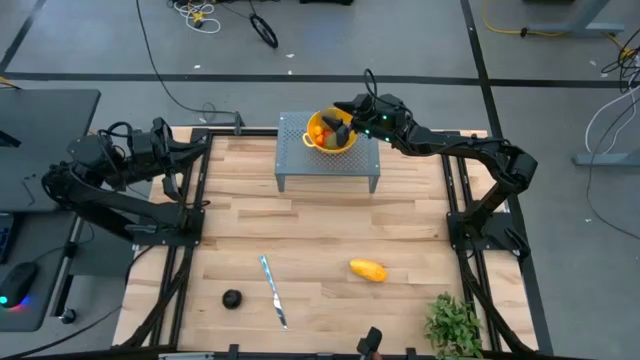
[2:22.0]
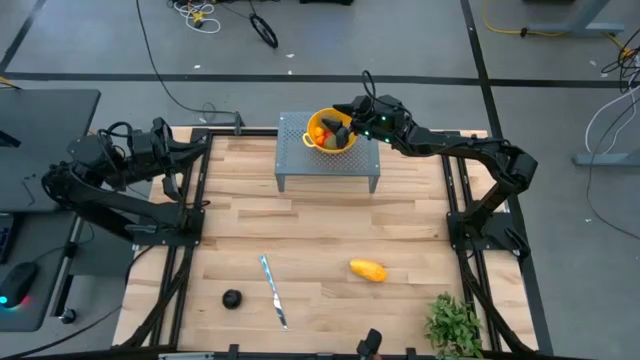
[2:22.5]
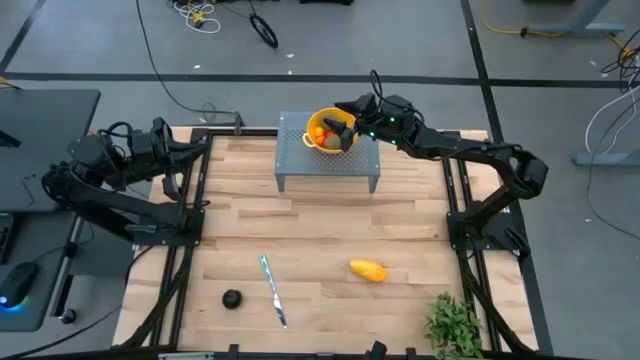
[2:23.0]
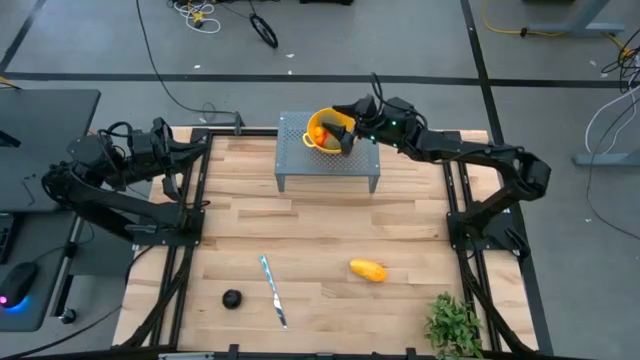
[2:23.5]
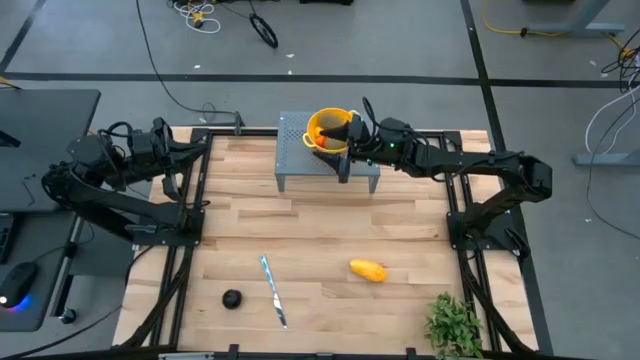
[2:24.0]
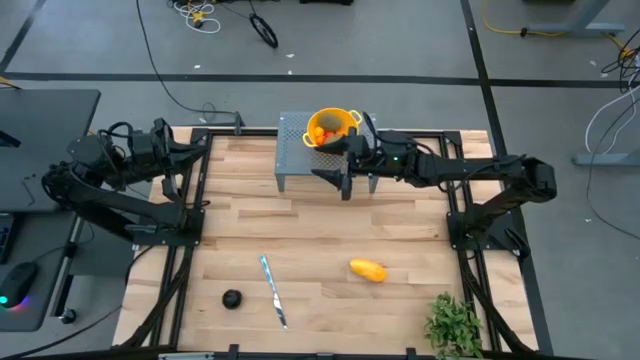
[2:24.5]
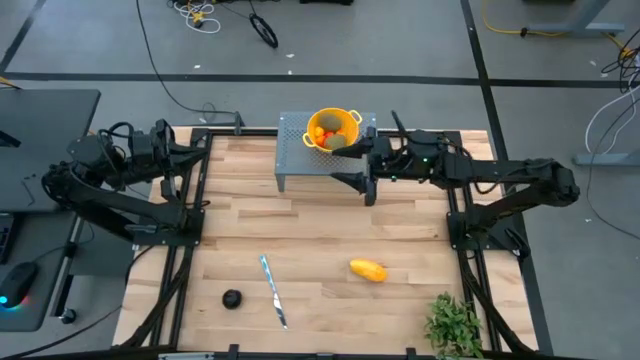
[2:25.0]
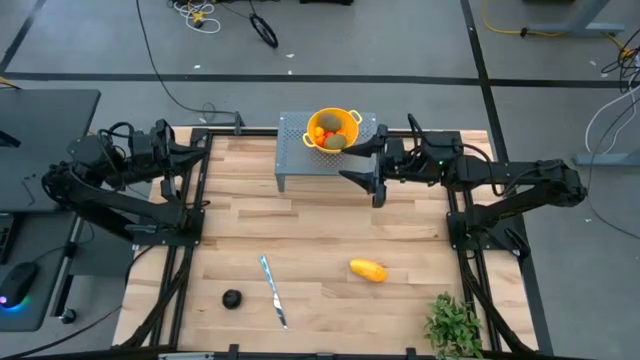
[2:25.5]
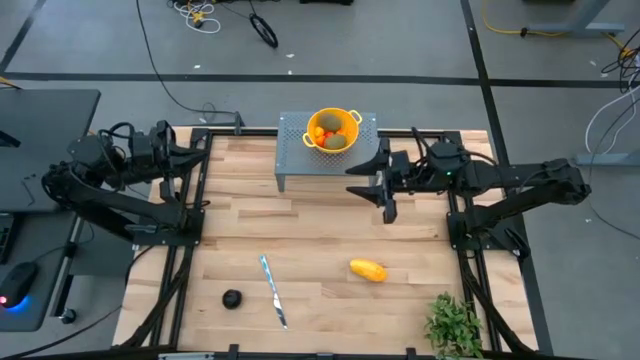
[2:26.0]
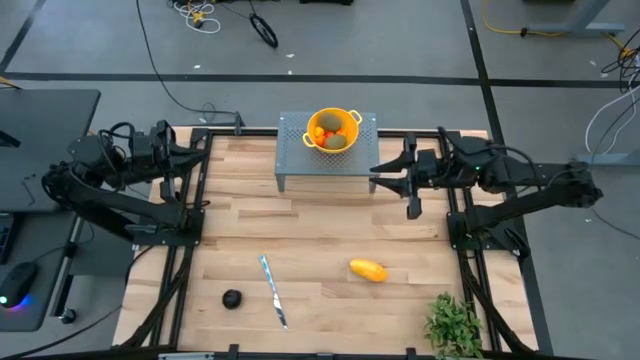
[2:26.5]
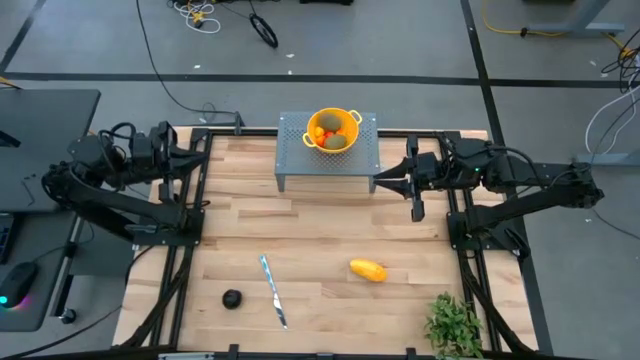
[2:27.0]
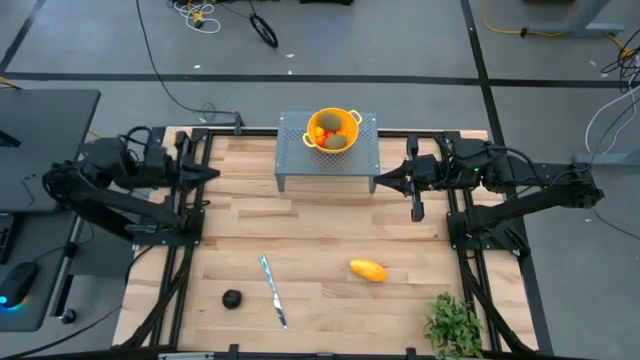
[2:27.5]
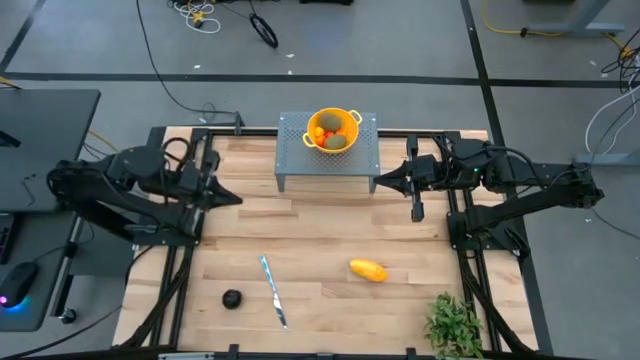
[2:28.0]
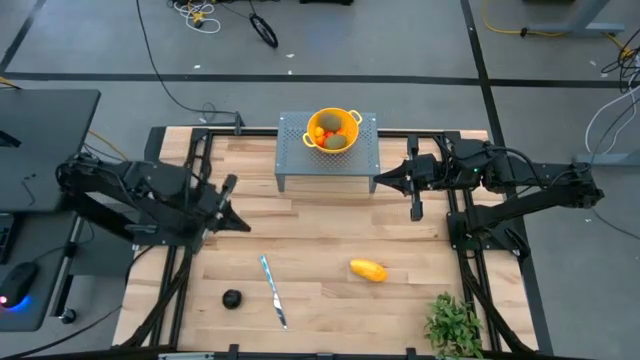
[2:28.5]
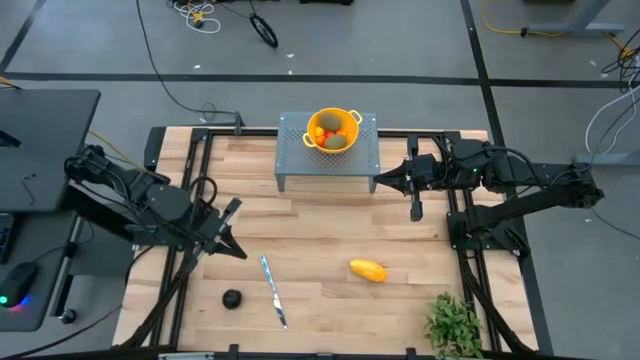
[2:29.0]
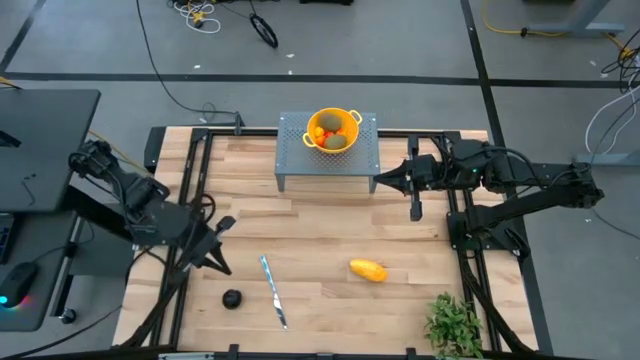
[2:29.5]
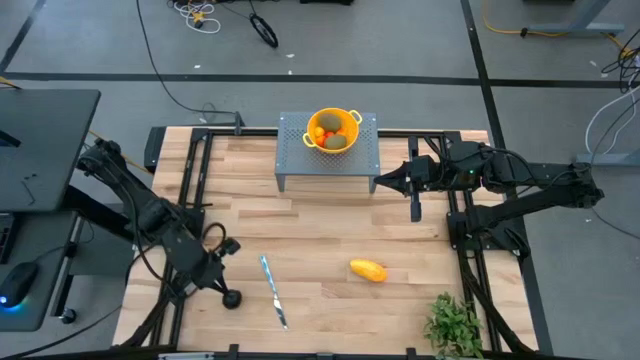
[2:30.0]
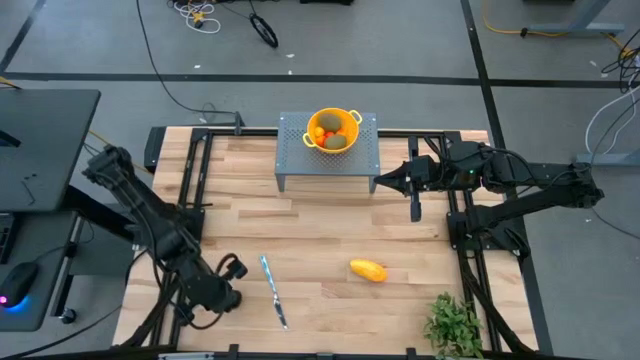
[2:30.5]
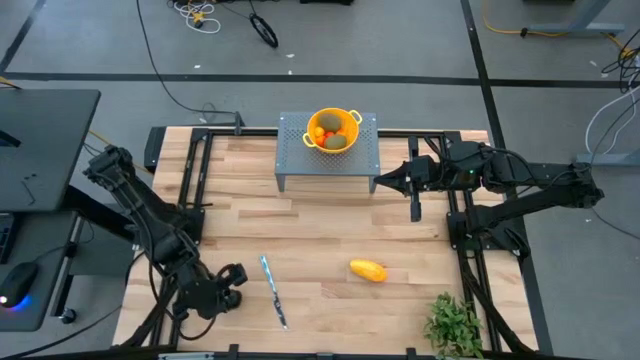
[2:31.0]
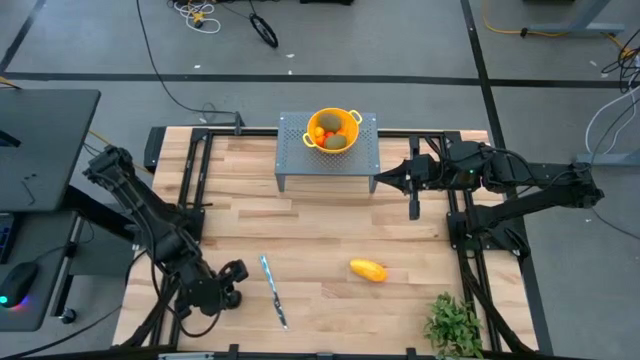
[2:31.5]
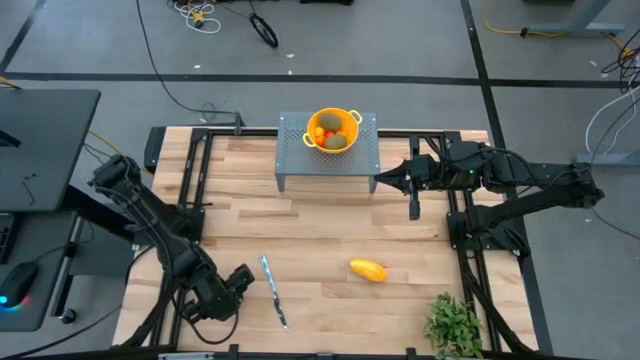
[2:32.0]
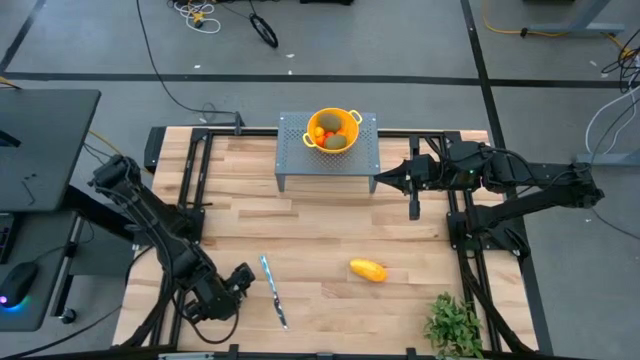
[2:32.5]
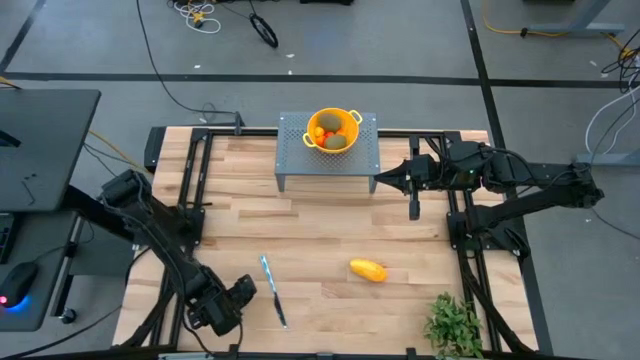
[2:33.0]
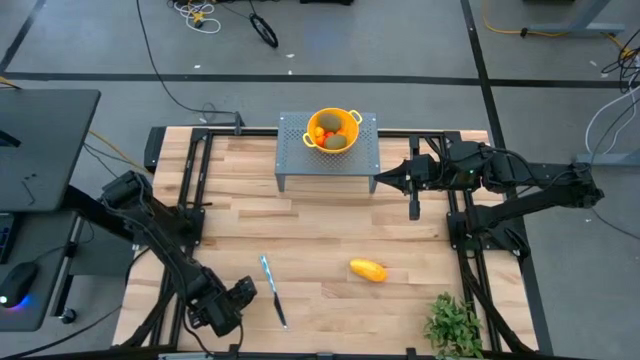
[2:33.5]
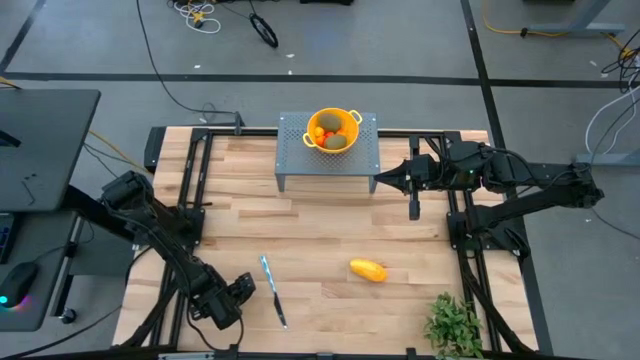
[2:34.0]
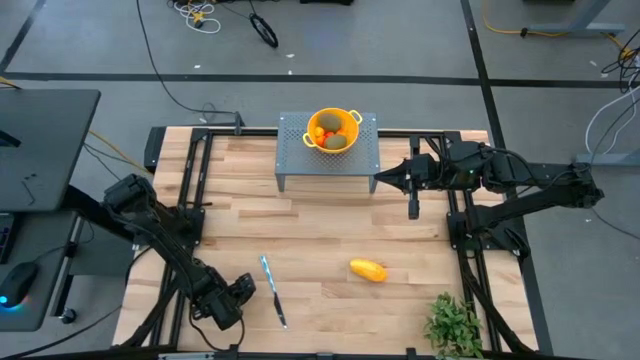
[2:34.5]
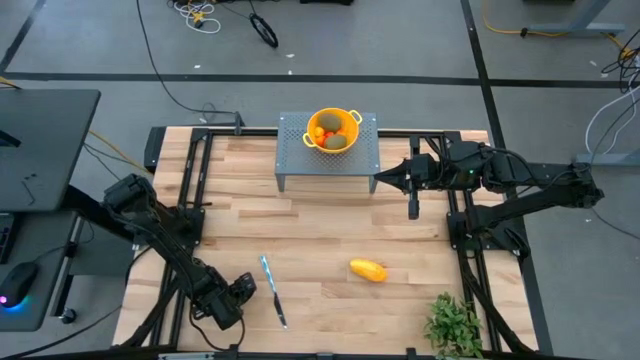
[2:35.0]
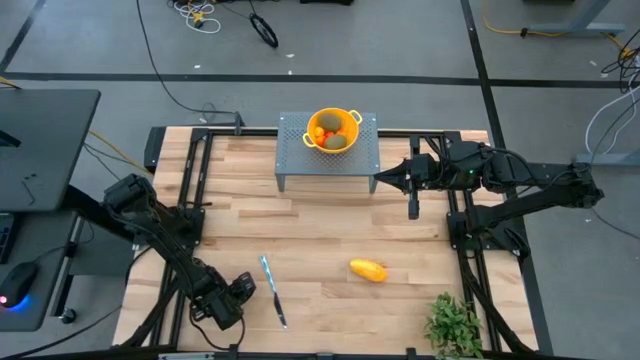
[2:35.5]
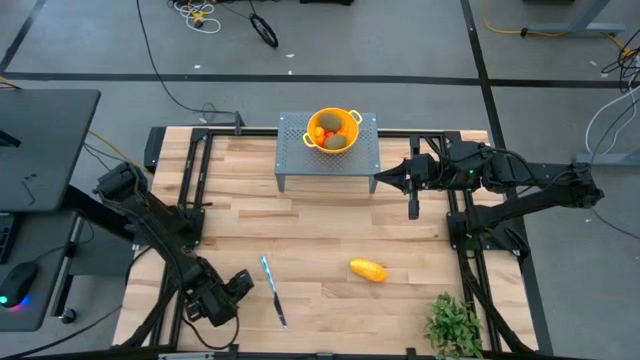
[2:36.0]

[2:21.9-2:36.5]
Task: Pick & Place Fruit
Put the plum into the yellow colander bowl on the shelf

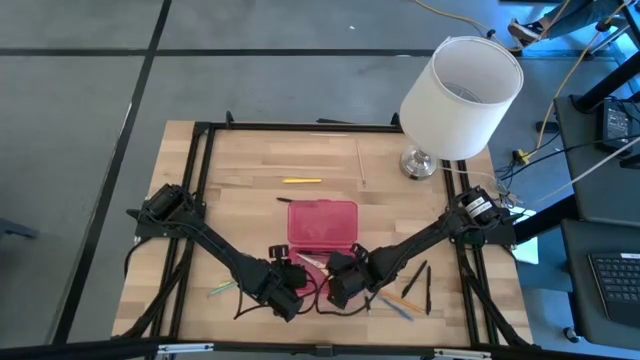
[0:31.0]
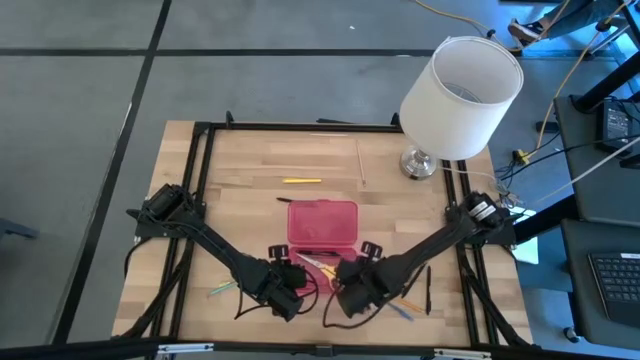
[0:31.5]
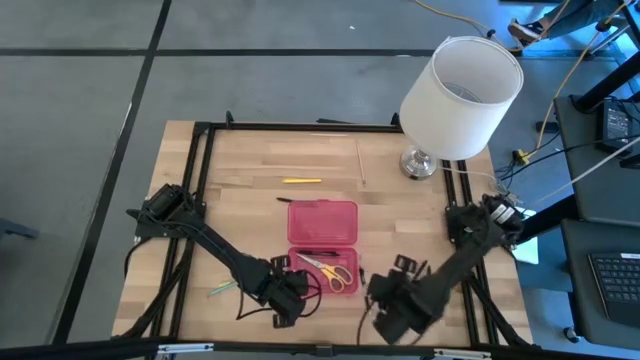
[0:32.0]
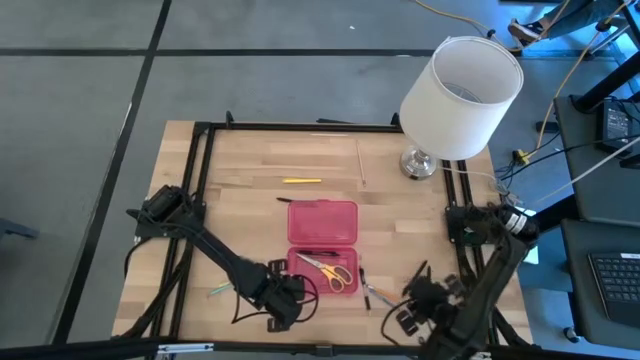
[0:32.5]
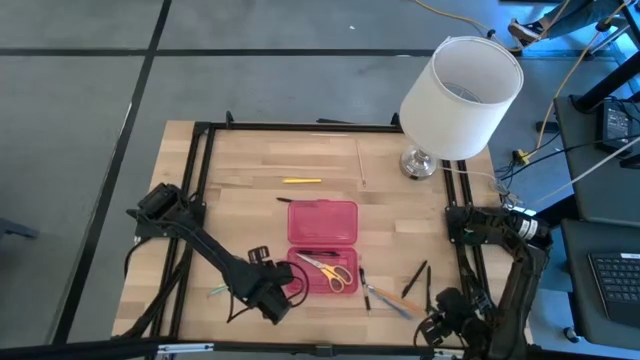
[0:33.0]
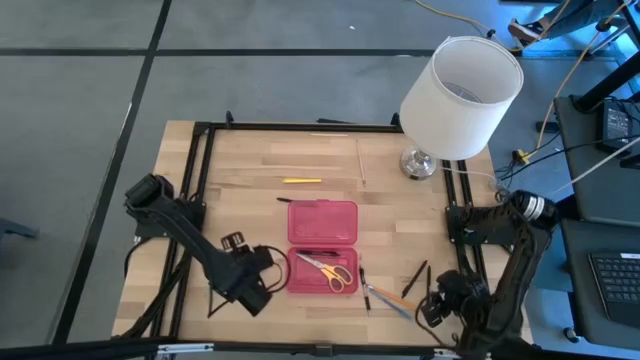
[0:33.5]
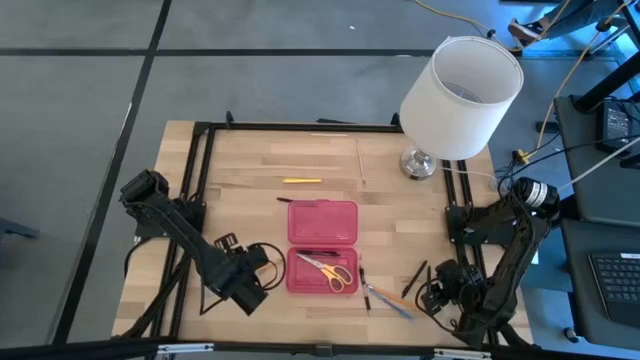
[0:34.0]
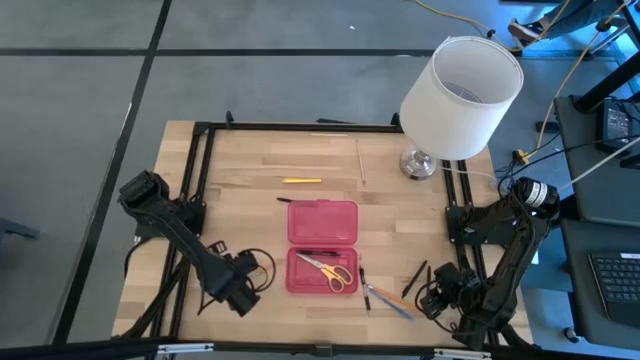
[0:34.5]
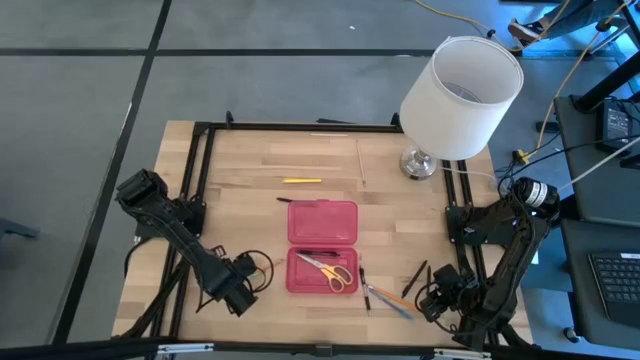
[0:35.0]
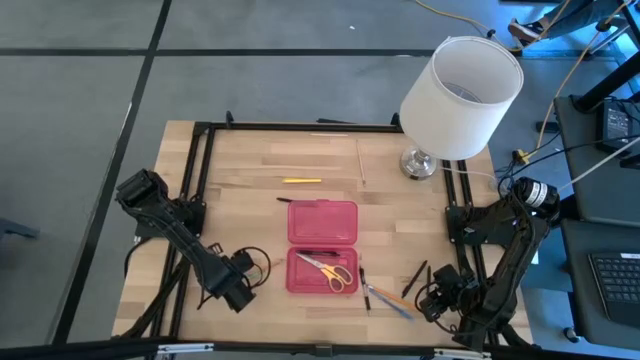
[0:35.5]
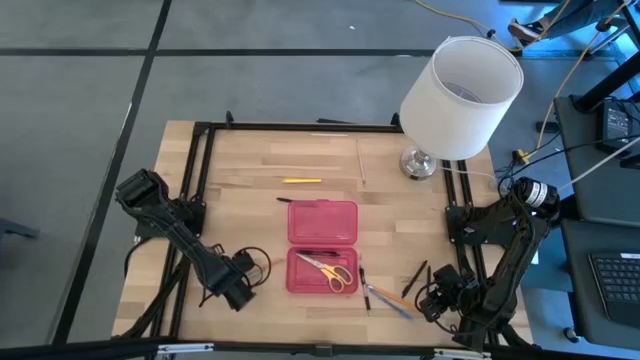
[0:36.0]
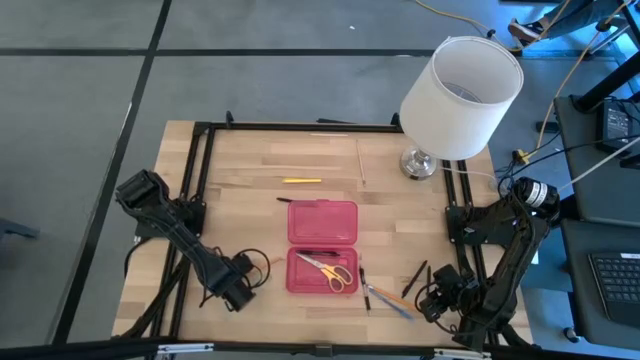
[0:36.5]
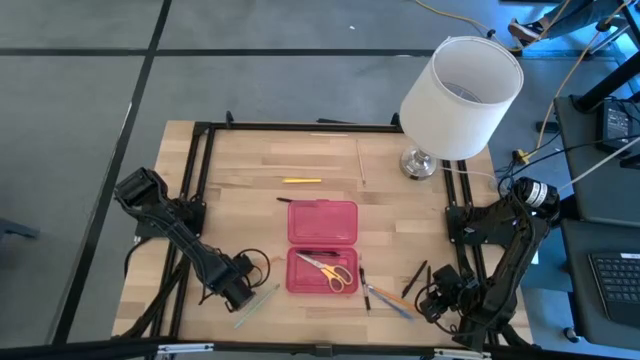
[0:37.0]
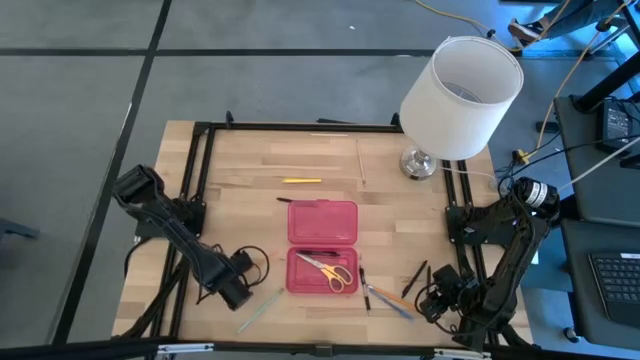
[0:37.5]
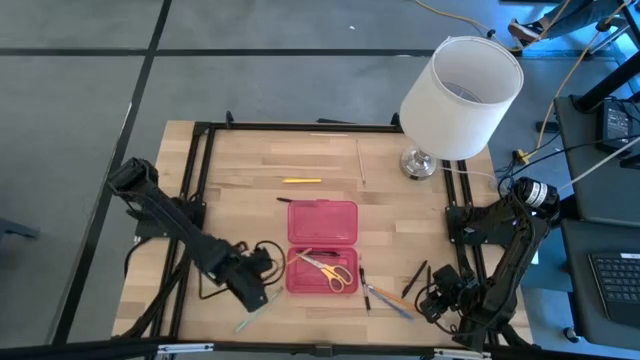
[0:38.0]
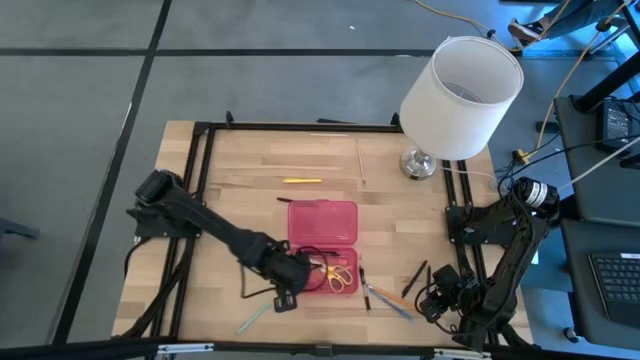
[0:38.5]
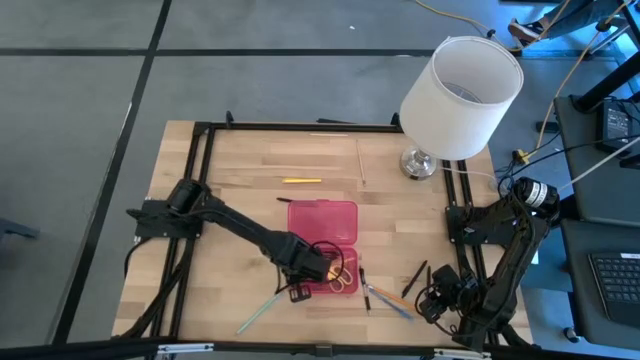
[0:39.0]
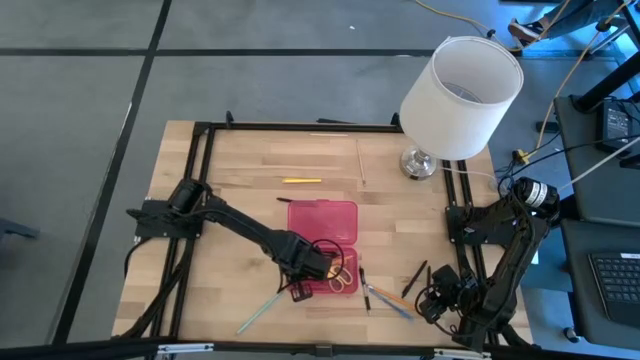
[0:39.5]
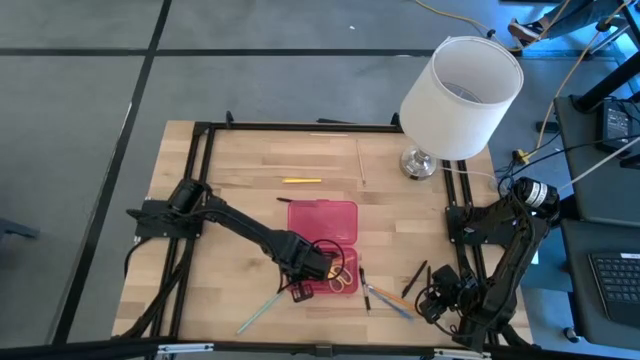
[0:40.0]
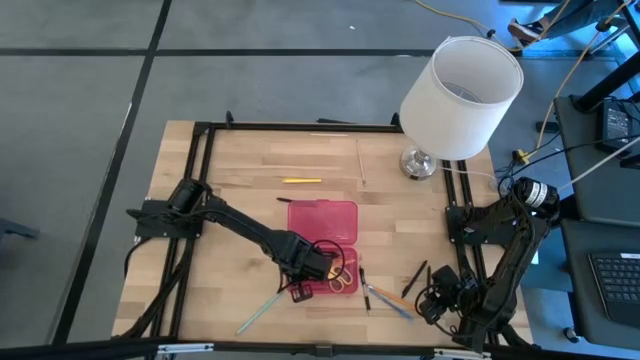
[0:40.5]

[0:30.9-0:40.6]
Task: Pick & place school supplies into a supply box
Put the right orange pencil into the red supply box
